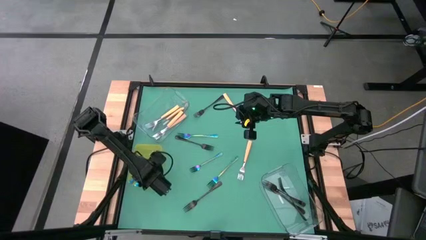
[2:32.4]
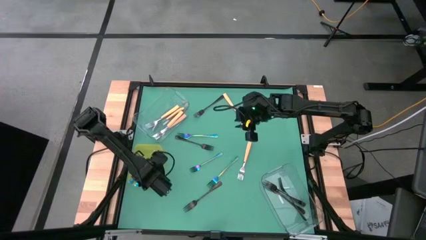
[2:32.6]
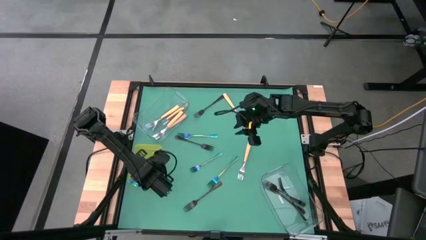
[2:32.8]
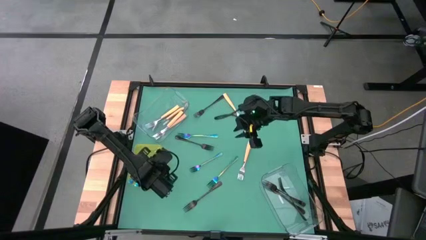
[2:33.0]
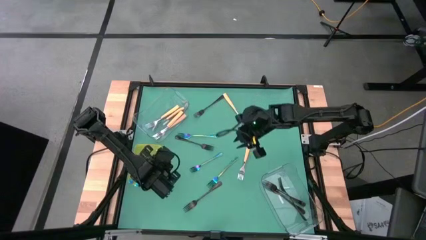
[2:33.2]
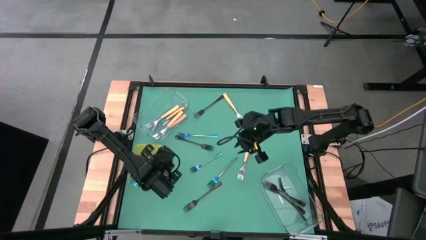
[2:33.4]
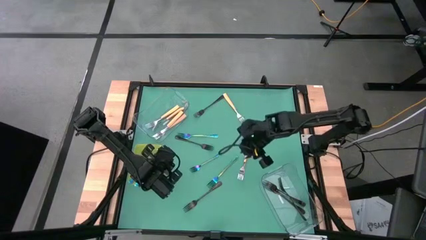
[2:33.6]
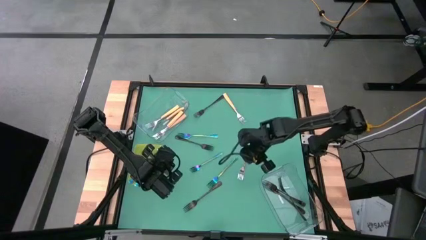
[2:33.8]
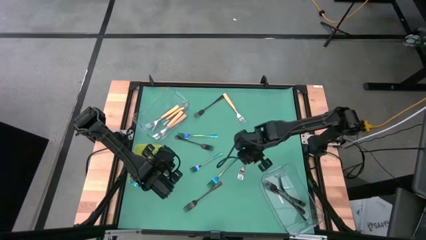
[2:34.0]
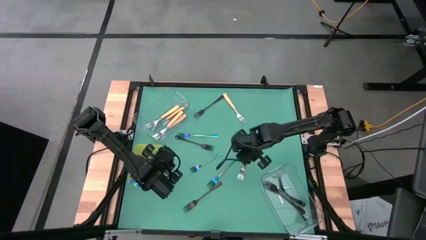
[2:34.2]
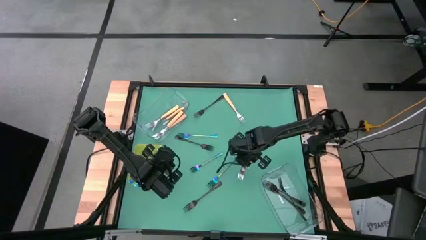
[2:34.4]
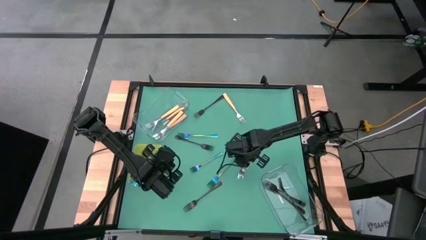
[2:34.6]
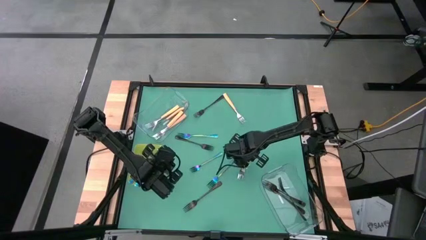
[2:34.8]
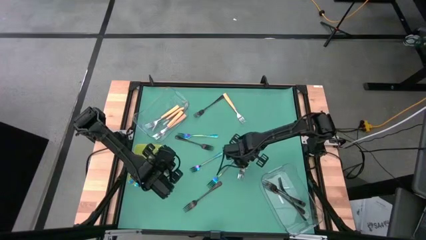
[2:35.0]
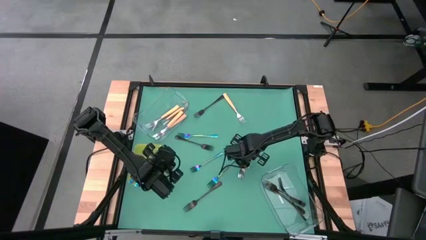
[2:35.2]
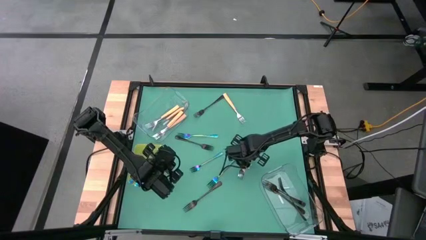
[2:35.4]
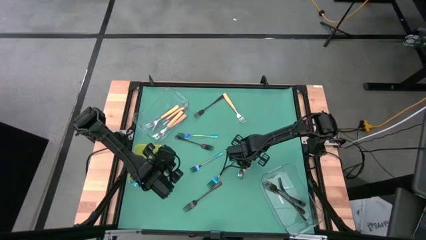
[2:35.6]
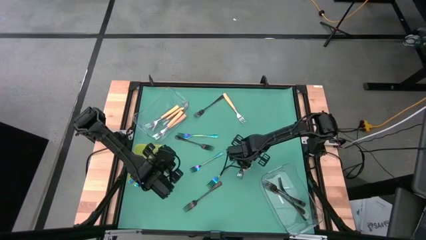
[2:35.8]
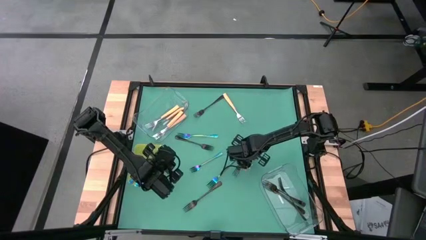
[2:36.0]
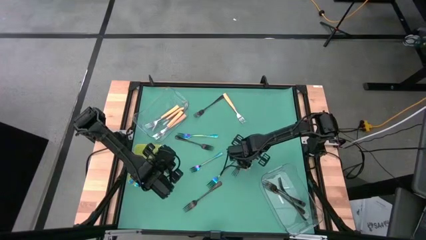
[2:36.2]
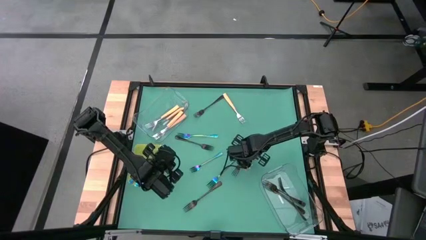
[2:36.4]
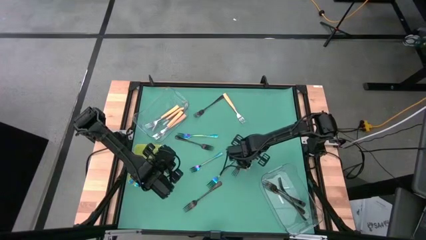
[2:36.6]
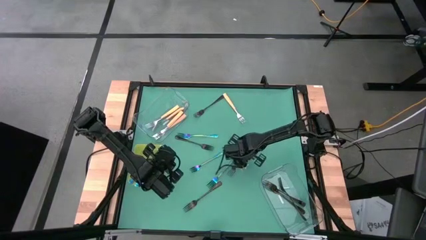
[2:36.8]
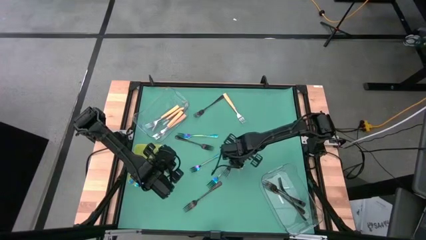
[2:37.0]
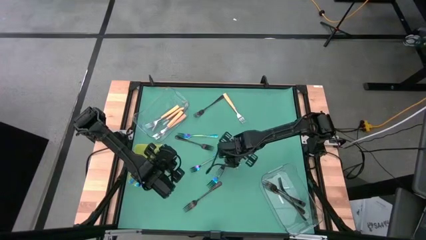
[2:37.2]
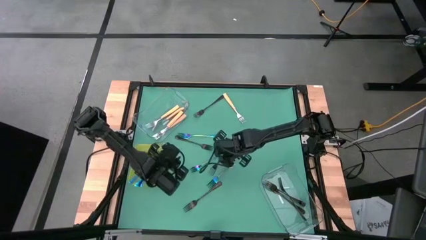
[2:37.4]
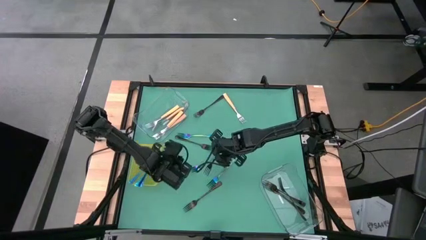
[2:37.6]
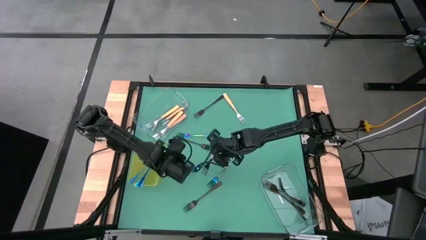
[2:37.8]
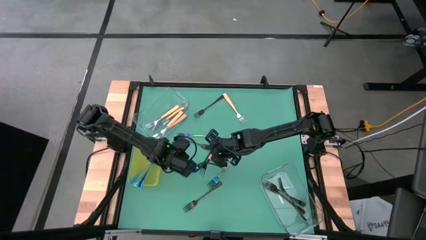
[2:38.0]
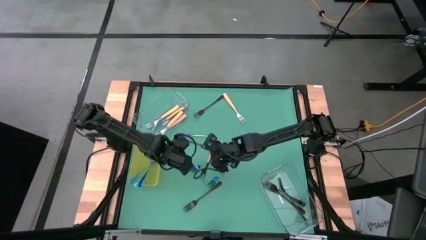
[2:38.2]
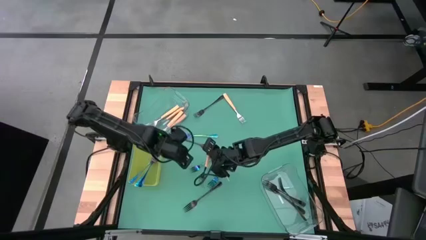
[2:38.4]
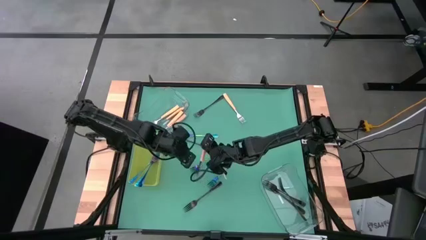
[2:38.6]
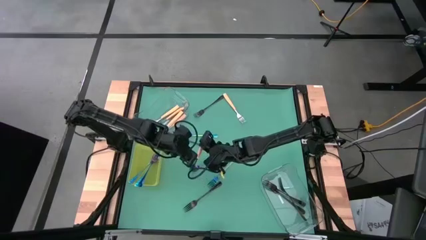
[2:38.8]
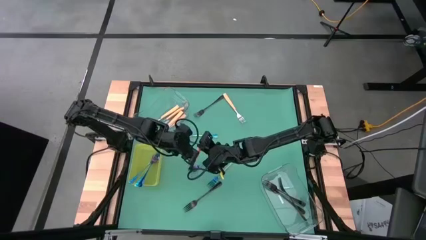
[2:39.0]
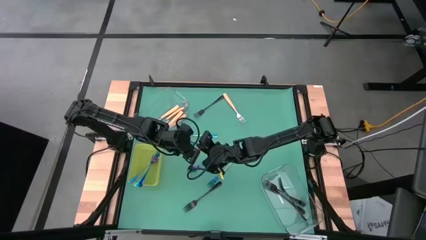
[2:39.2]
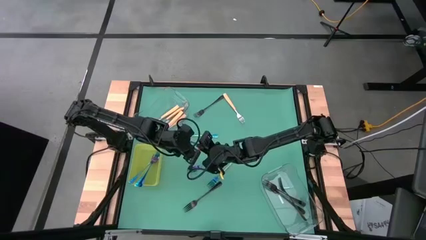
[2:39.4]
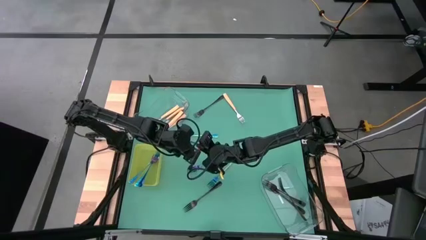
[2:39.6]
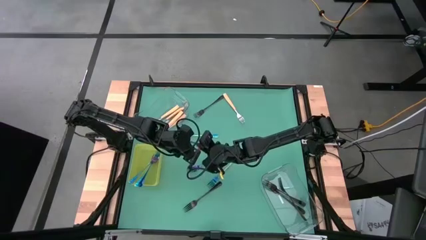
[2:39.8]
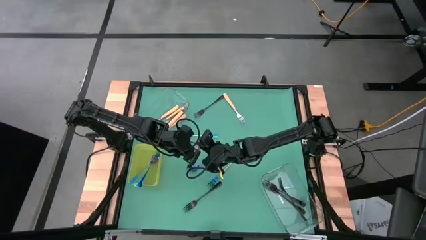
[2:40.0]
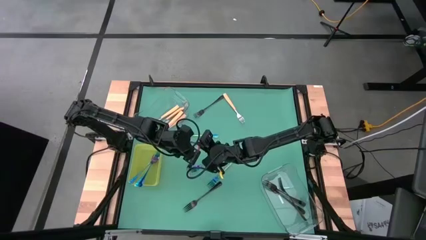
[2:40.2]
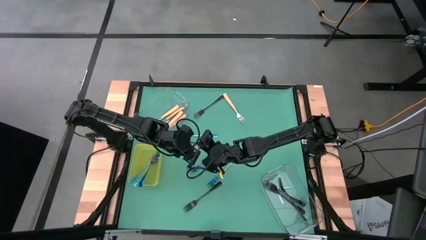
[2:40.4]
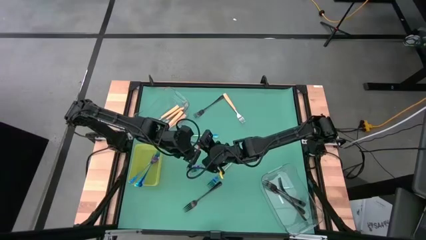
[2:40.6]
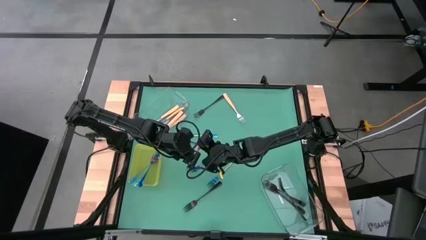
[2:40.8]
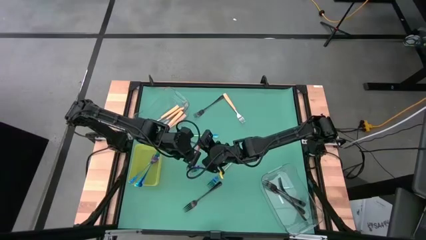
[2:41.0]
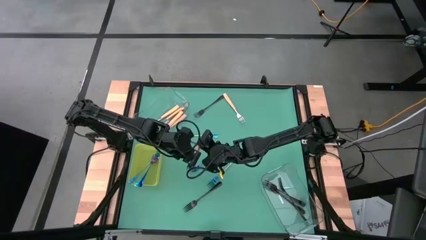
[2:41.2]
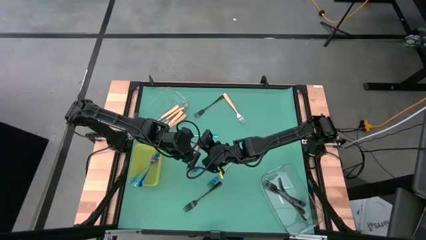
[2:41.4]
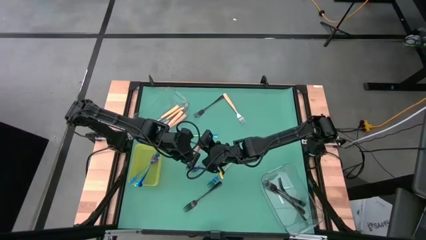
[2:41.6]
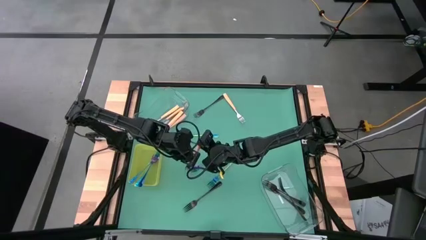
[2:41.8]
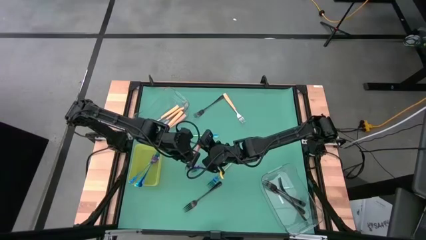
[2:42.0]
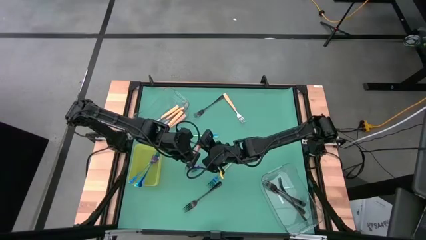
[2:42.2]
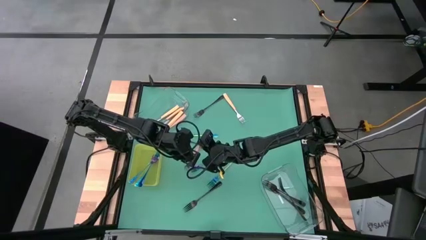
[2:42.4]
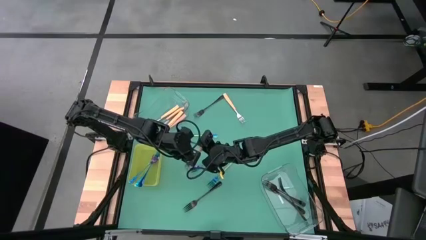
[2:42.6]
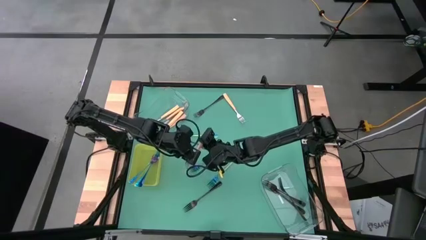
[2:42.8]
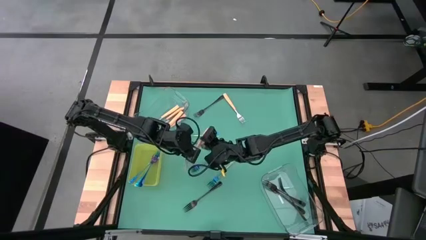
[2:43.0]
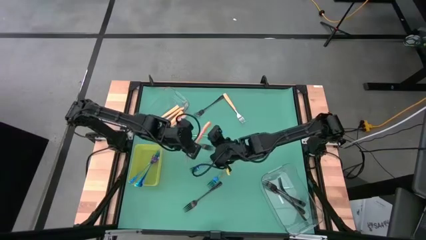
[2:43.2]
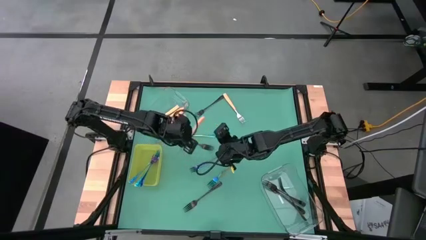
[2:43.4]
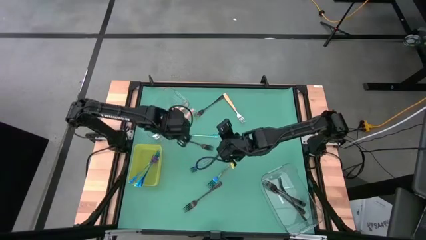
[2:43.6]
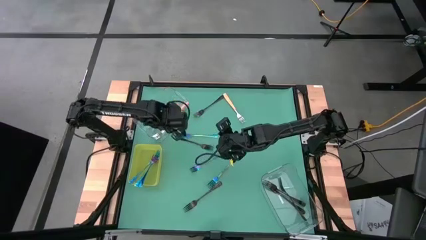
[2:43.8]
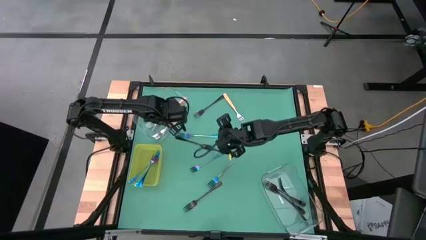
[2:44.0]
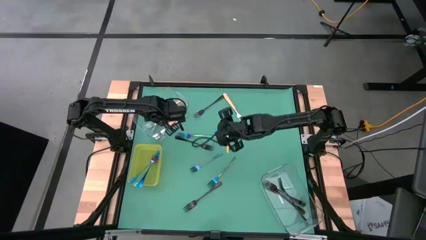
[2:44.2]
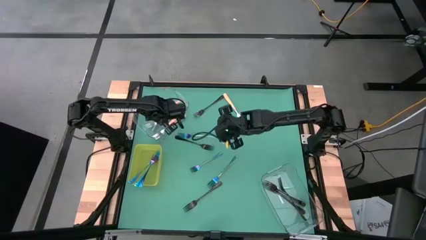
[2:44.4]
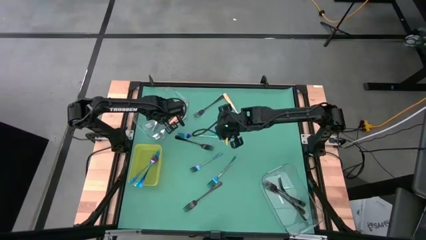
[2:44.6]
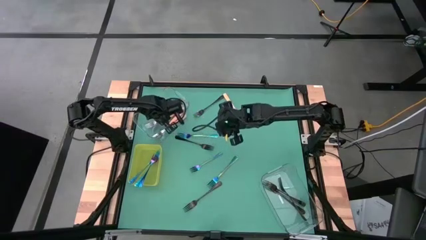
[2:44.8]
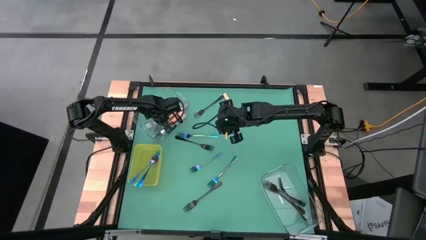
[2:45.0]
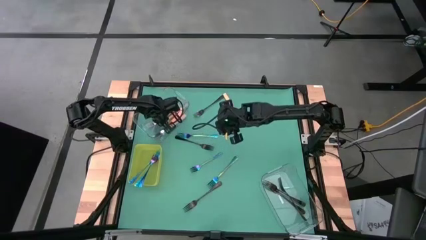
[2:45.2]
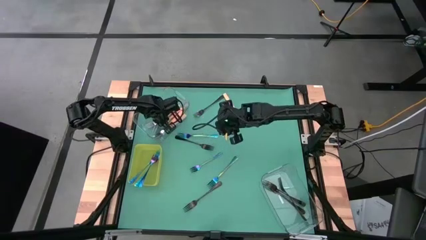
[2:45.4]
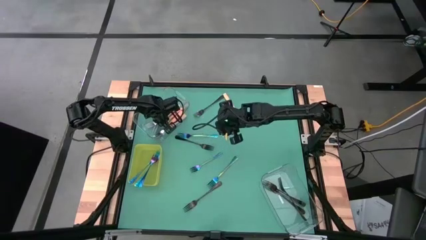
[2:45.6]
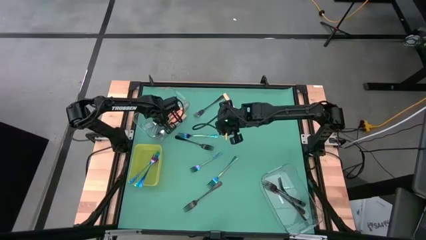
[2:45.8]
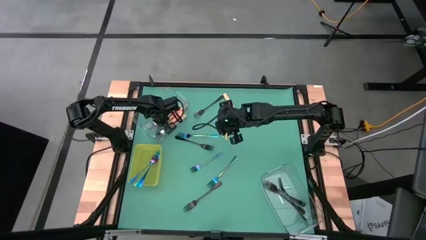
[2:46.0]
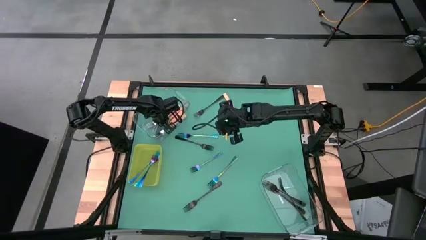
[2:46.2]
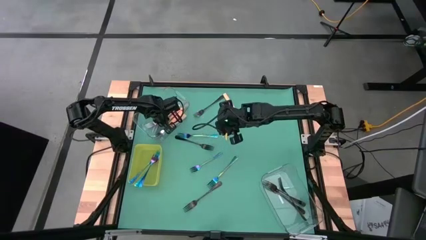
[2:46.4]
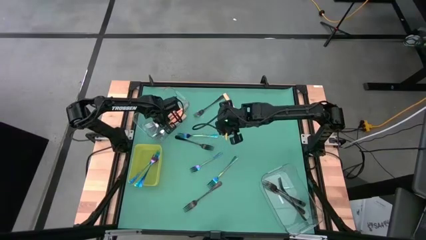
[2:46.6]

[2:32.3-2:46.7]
Task: Sort silverware by color (type)
Put the orange fork in the top transparent bin
